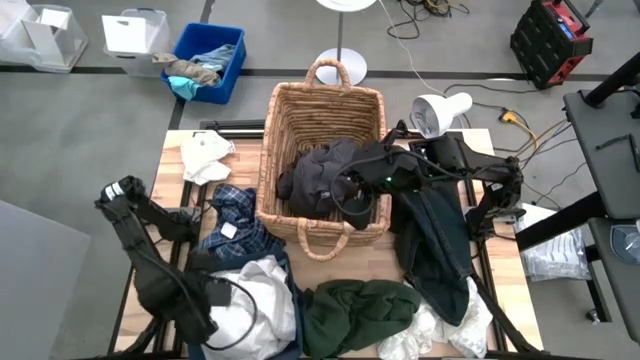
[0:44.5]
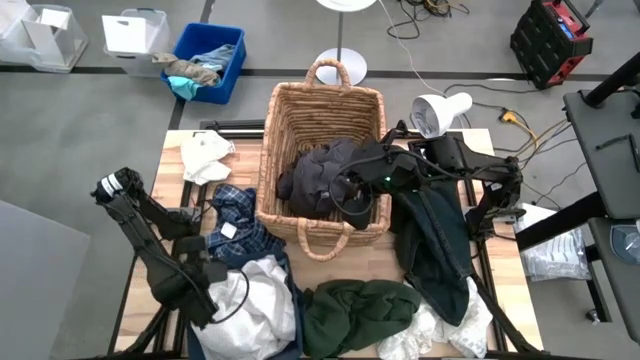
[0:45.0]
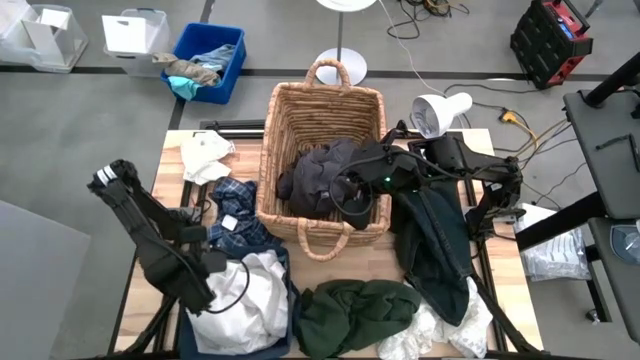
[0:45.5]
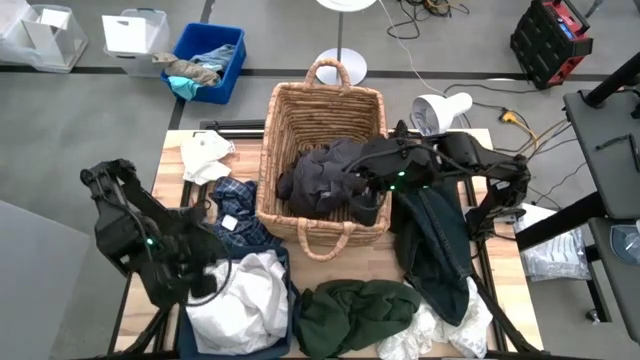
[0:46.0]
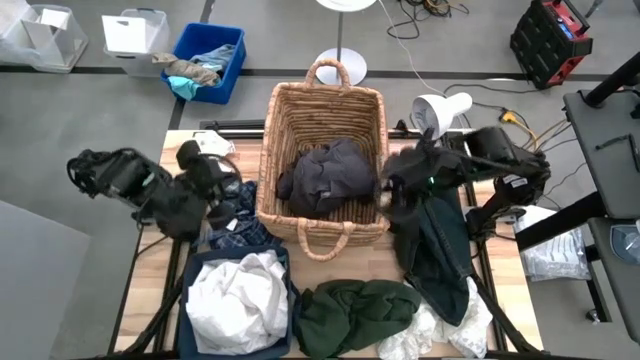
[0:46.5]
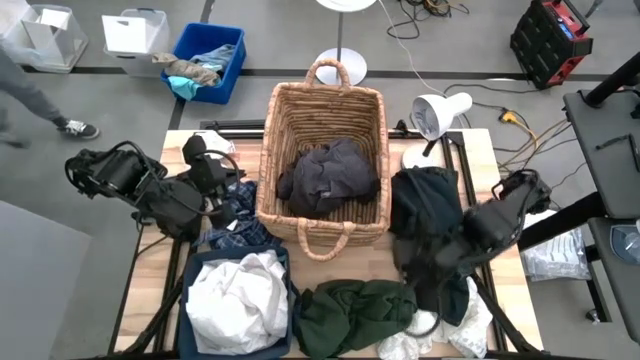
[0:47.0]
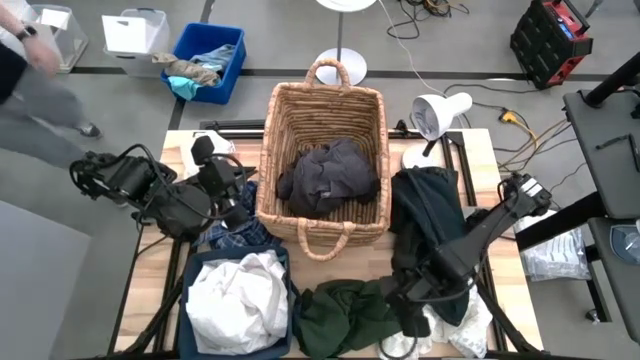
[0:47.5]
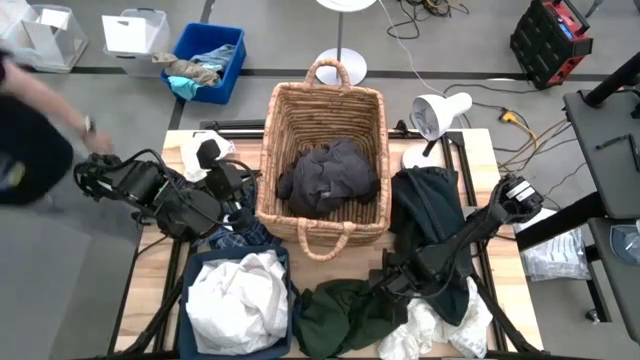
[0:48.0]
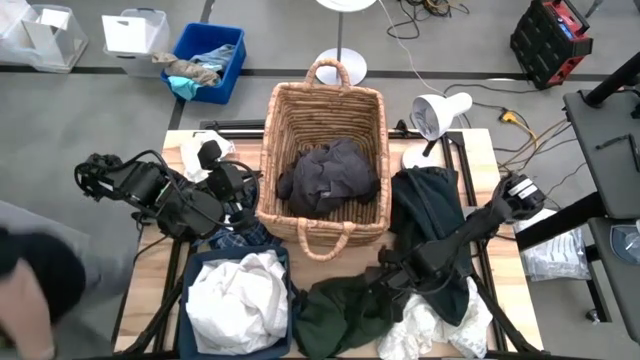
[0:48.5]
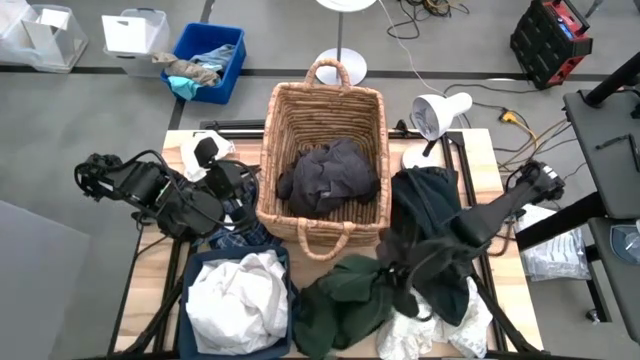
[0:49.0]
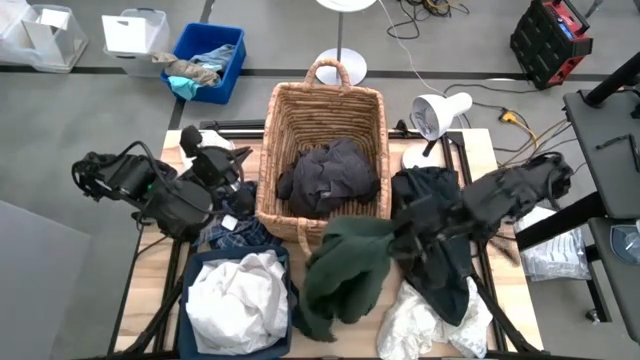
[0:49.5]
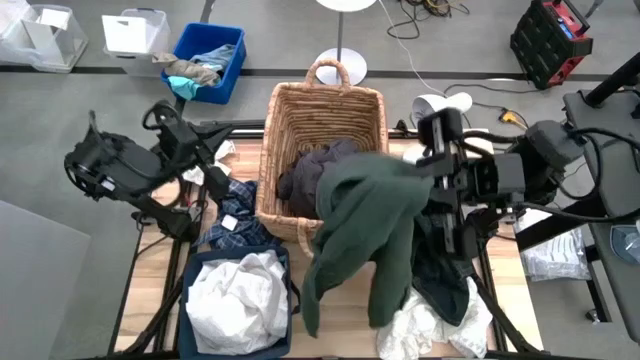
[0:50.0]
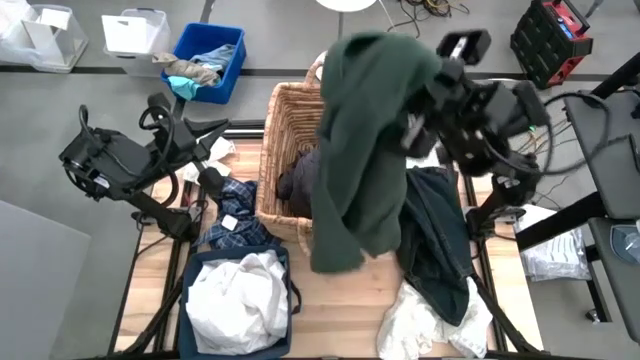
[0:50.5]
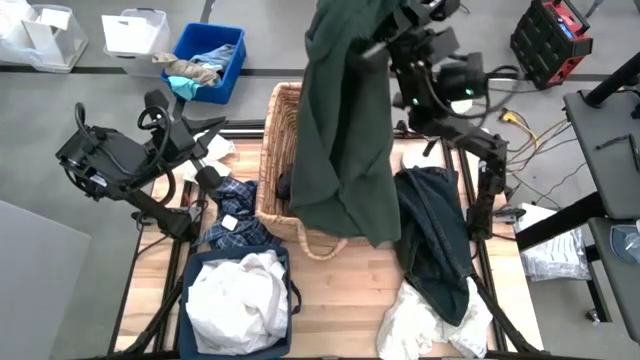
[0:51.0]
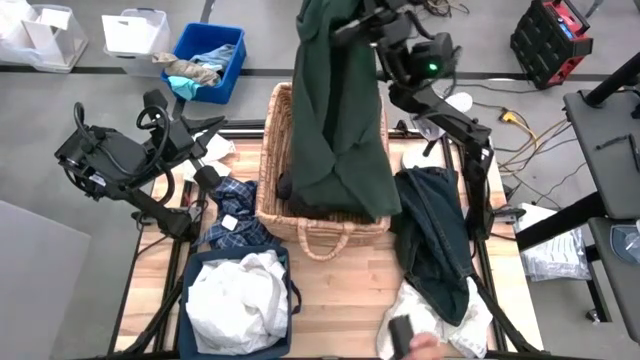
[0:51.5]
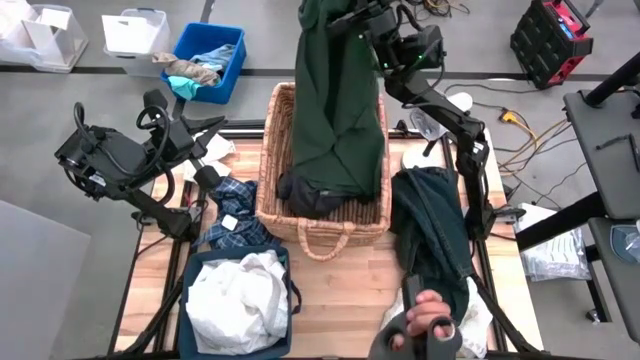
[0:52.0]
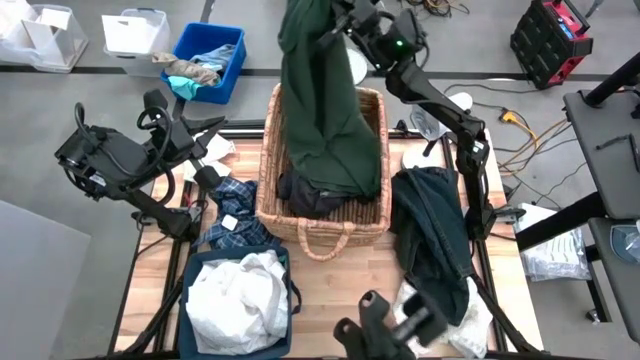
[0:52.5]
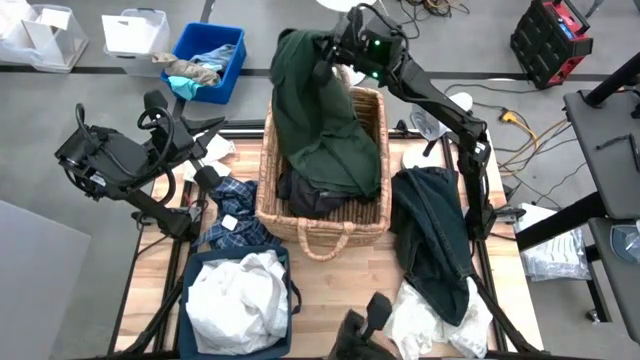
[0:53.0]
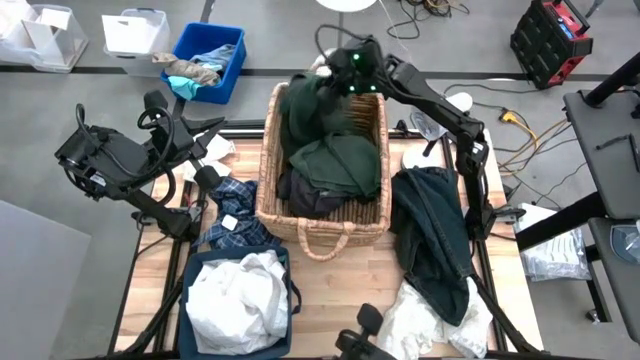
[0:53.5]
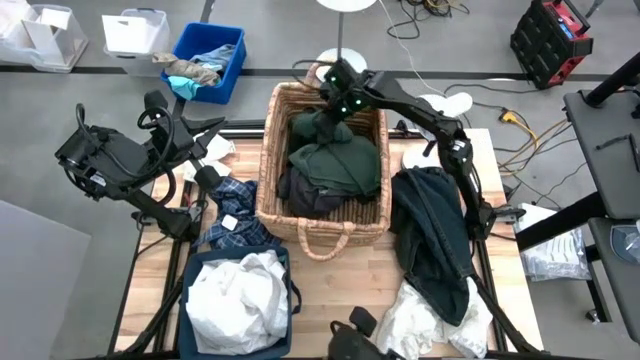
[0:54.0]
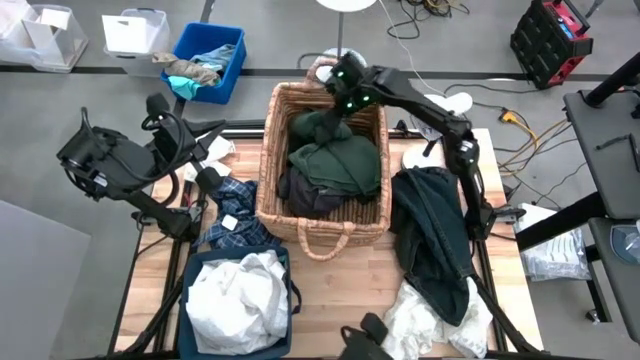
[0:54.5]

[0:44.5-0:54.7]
Task: Sort clothes
Put the green shirt into the brown basket

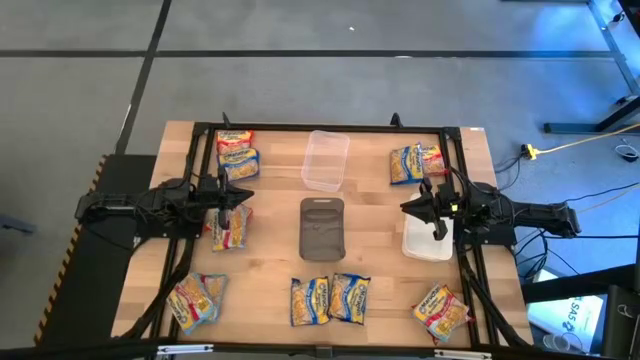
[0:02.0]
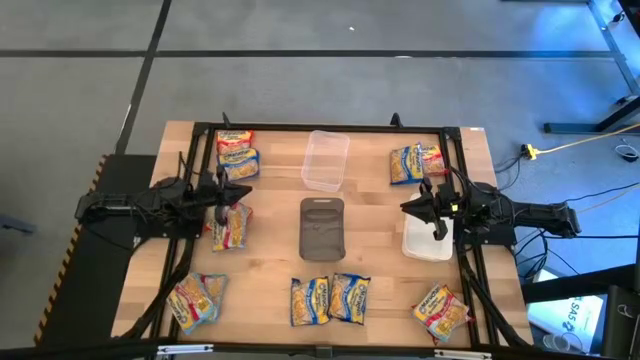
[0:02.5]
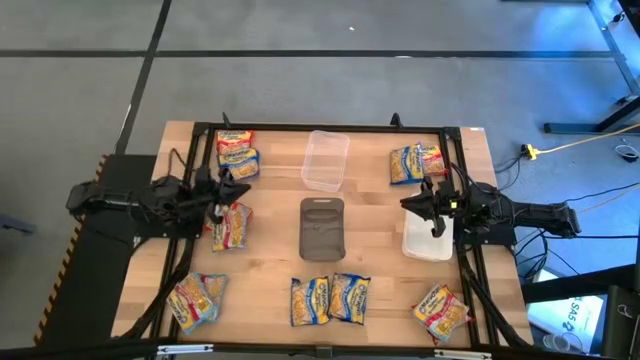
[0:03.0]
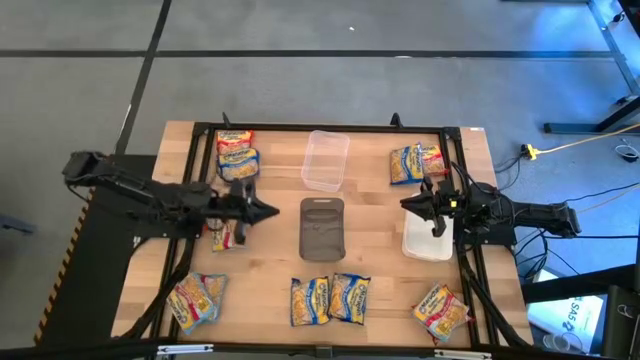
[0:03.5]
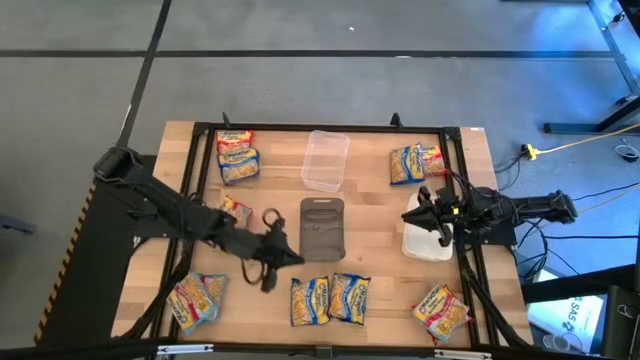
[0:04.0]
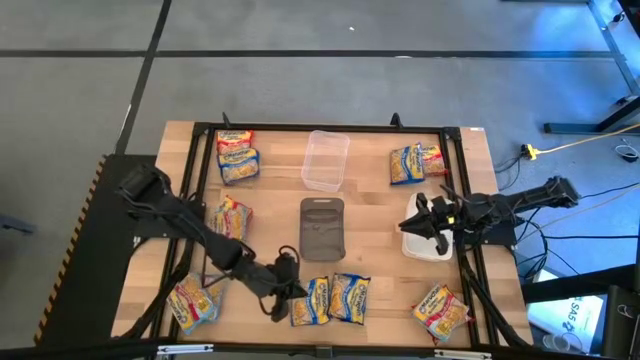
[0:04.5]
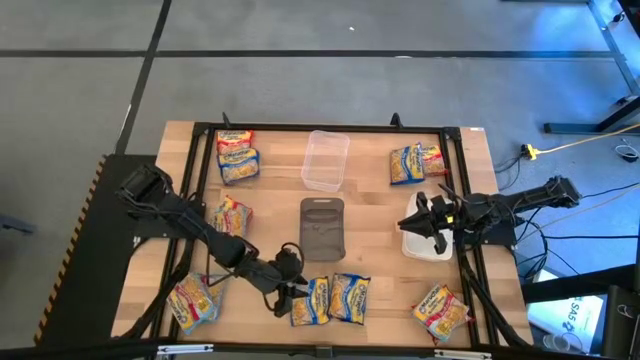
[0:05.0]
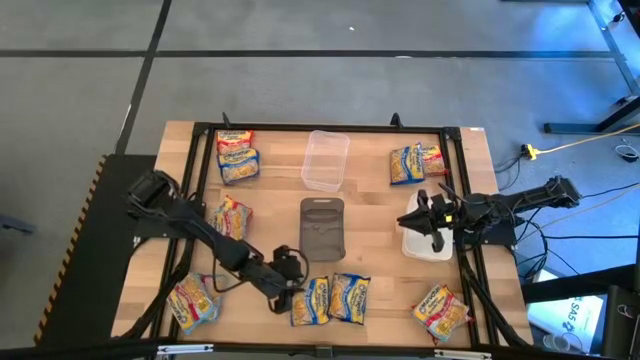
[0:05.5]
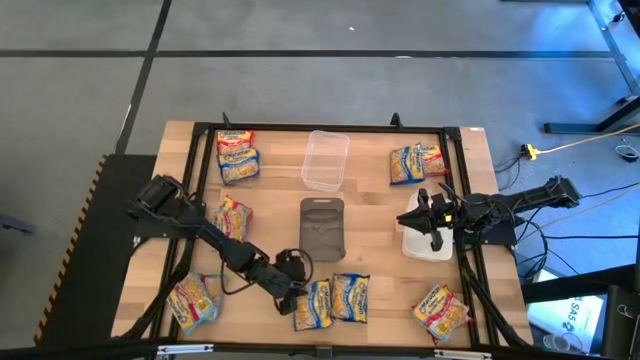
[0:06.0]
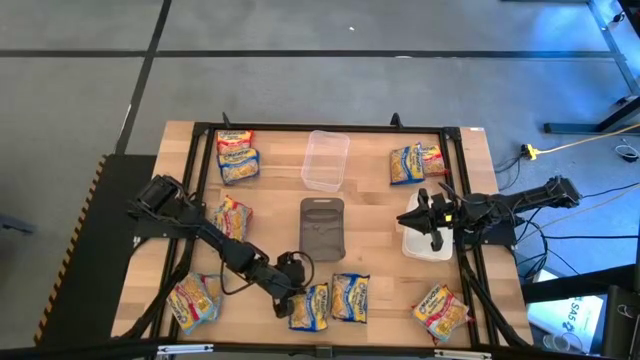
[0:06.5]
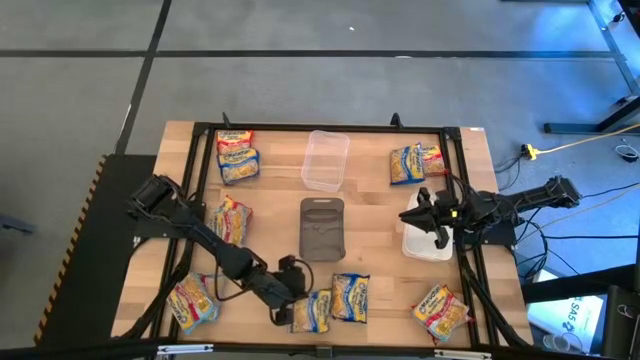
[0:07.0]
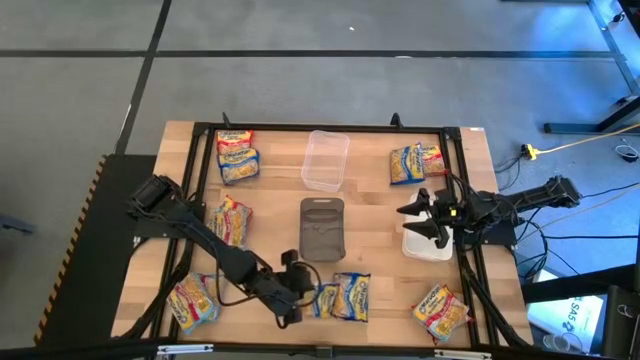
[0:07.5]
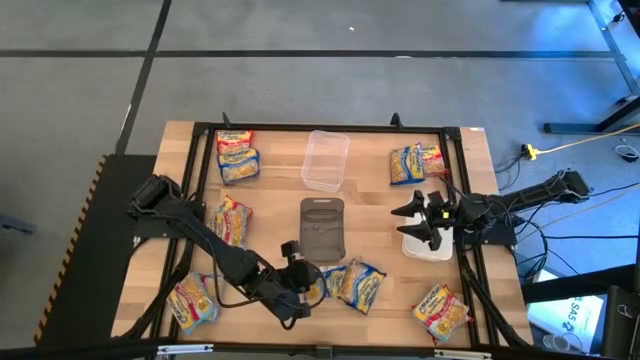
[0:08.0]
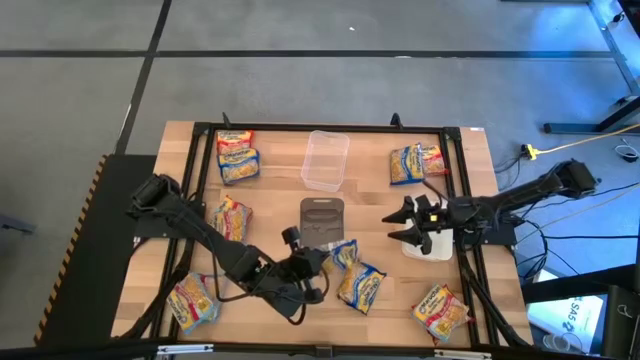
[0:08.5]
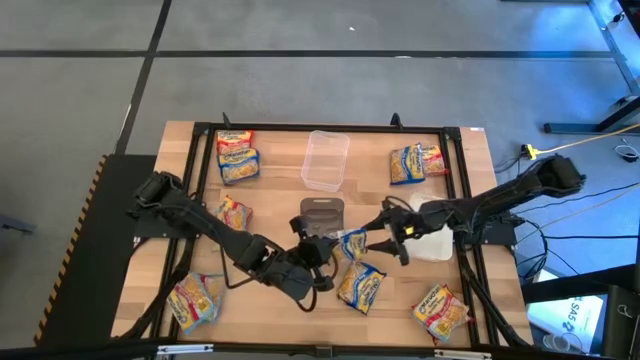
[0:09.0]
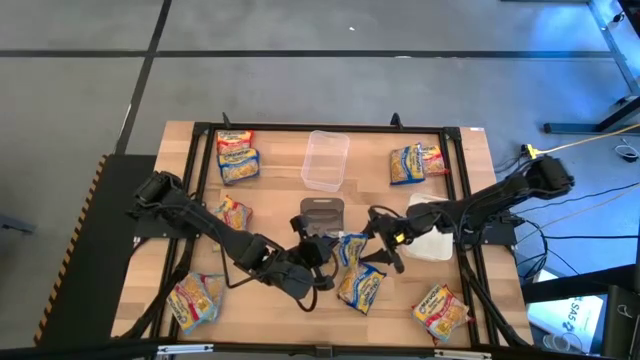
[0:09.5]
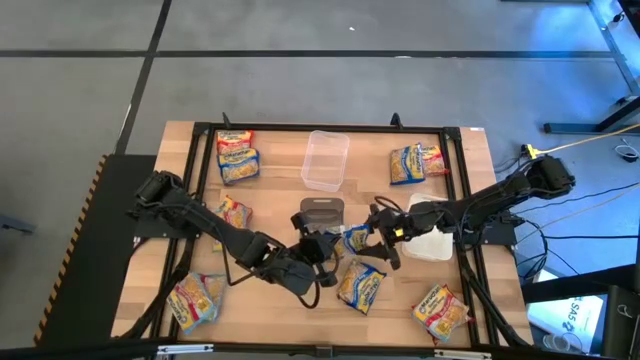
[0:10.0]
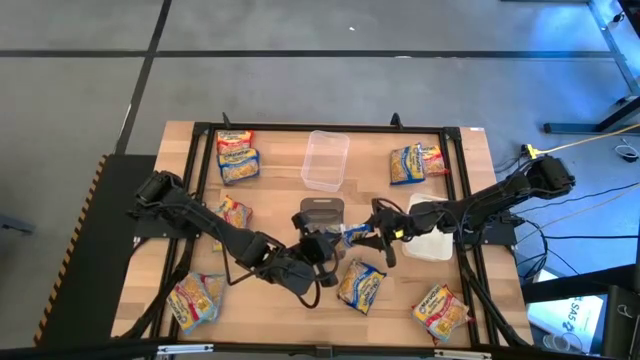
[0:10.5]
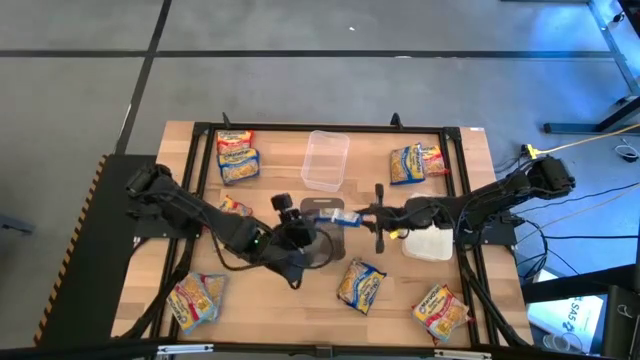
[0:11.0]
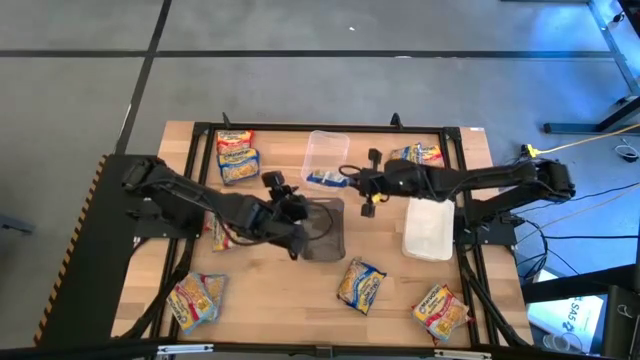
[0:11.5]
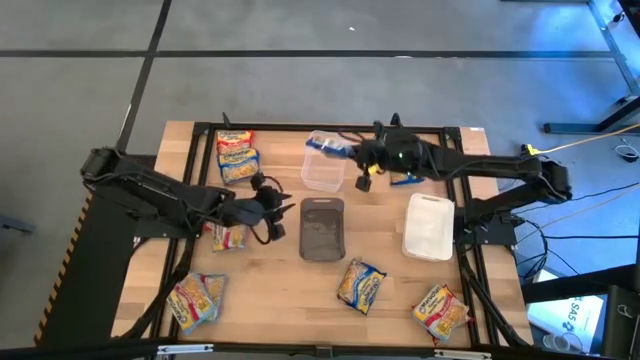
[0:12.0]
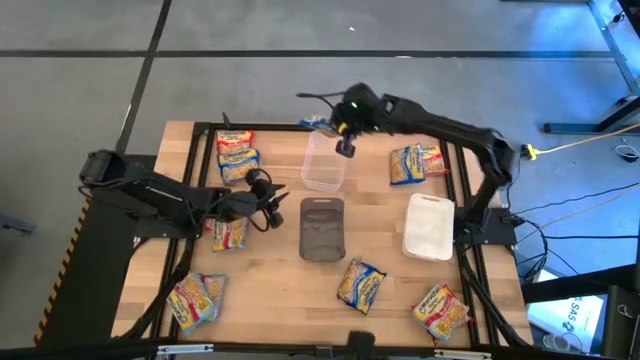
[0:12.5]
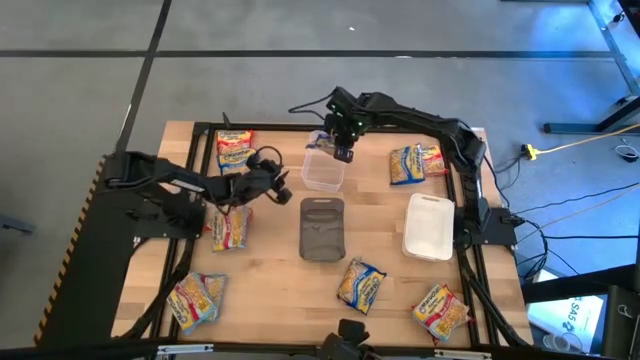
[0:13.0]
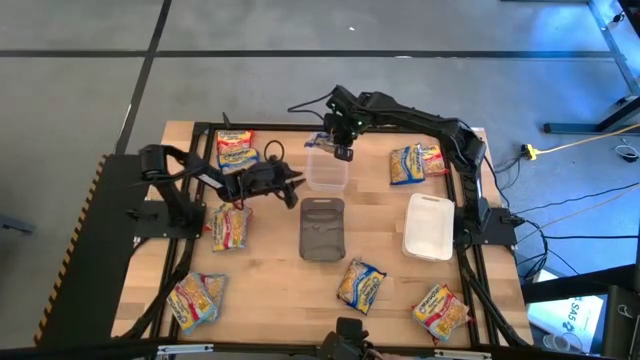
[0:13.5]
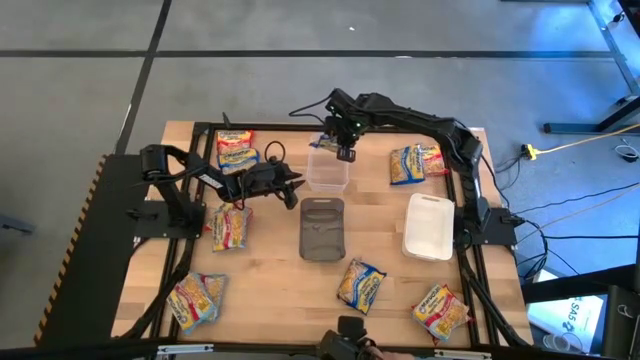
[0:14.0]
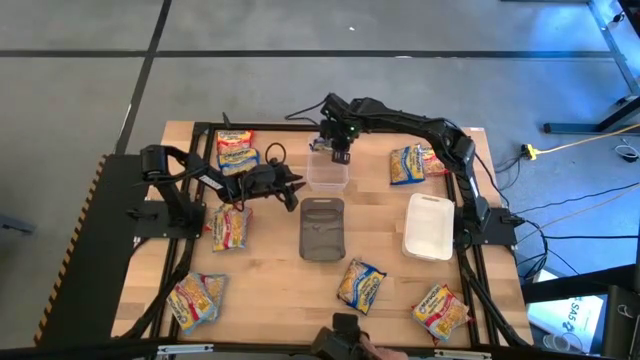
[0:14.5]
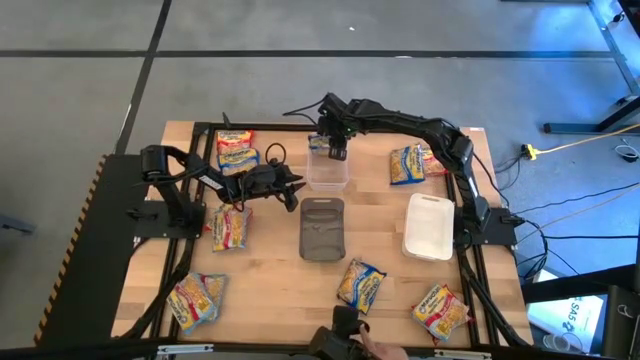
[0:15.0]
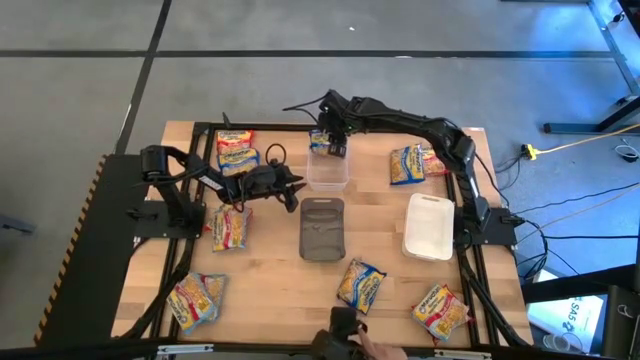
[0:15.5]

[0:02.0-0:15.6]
Task: Sort Maruchan noodles
Put the blue noodle pack into the transparent bin
